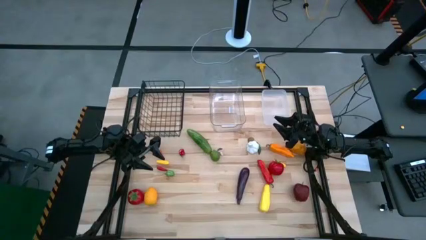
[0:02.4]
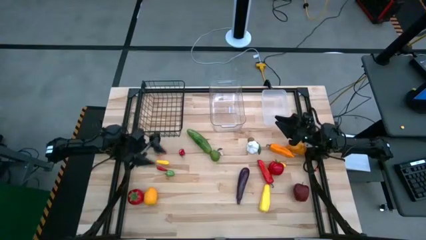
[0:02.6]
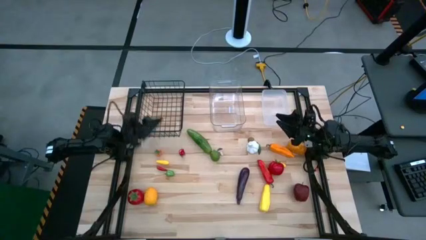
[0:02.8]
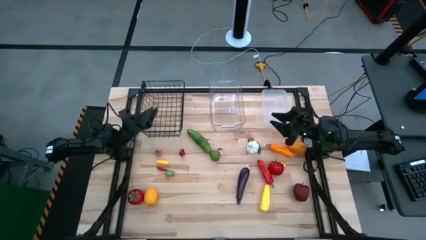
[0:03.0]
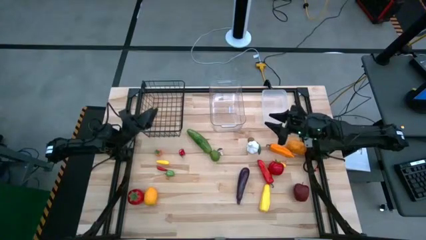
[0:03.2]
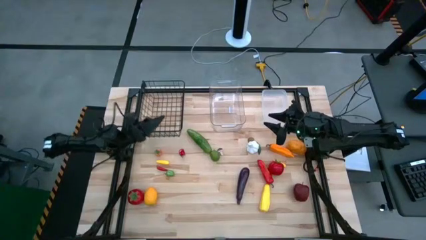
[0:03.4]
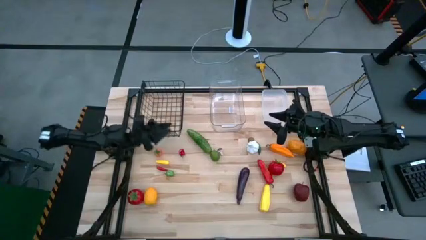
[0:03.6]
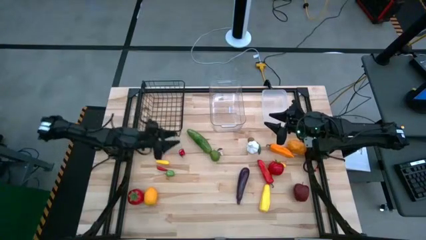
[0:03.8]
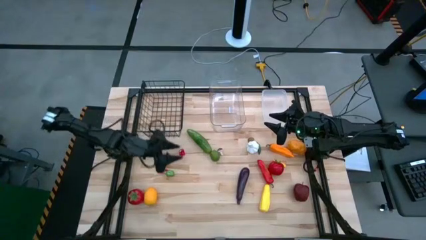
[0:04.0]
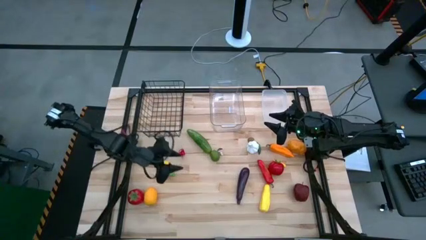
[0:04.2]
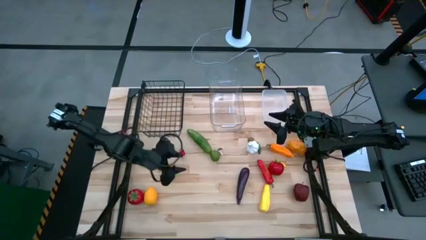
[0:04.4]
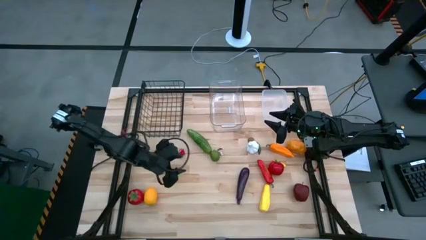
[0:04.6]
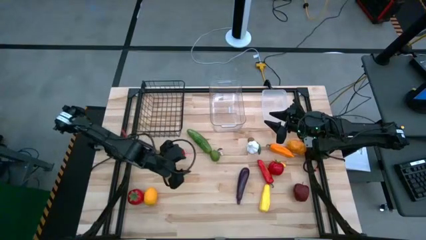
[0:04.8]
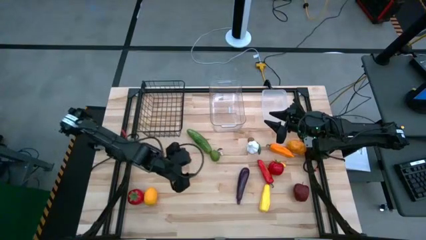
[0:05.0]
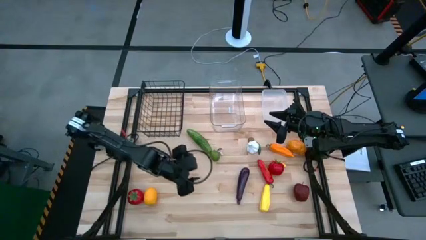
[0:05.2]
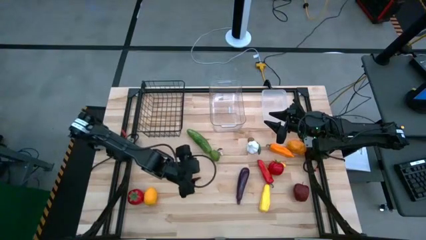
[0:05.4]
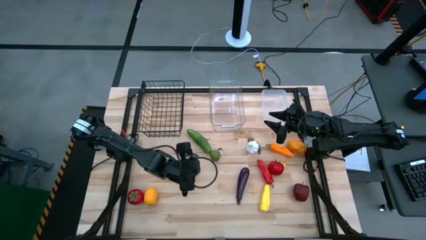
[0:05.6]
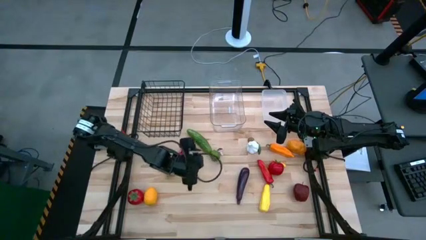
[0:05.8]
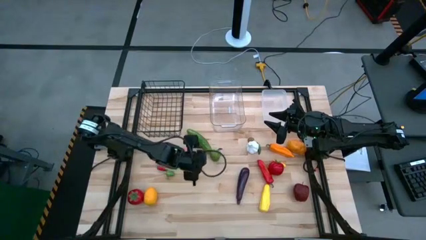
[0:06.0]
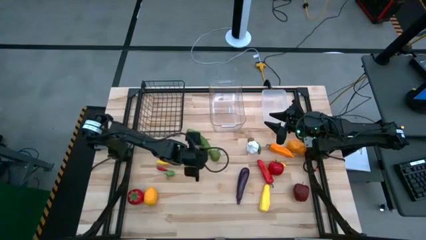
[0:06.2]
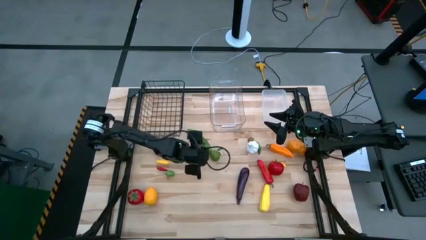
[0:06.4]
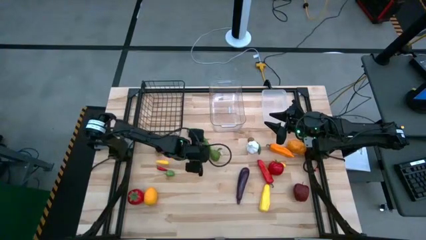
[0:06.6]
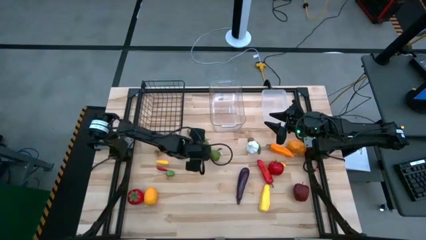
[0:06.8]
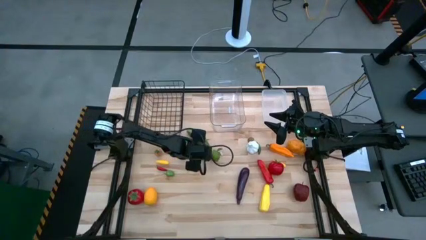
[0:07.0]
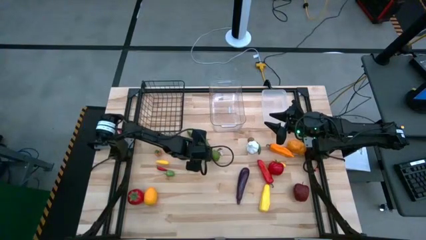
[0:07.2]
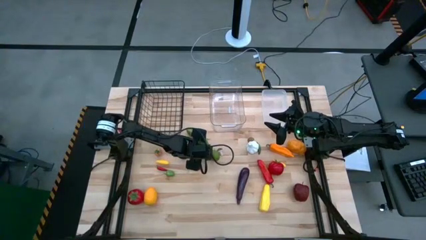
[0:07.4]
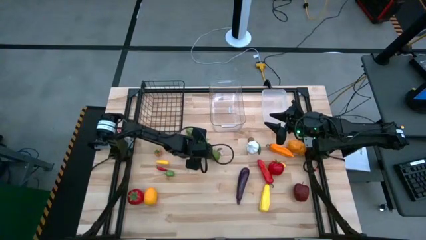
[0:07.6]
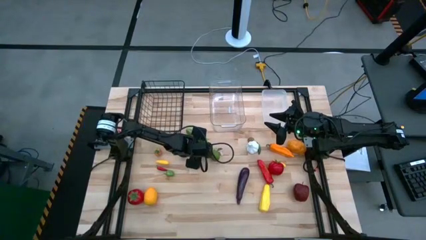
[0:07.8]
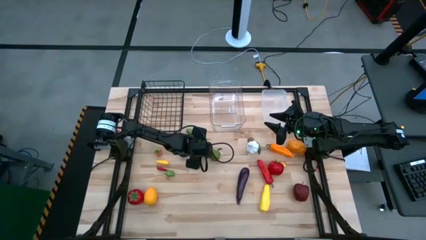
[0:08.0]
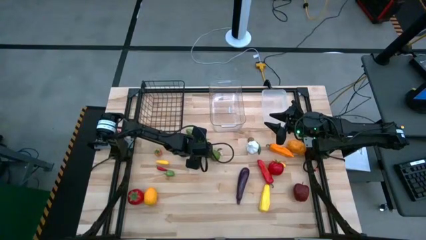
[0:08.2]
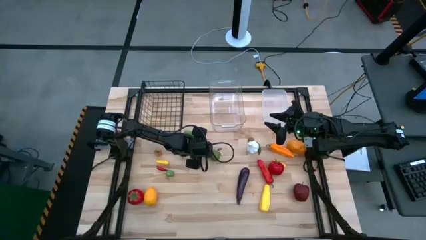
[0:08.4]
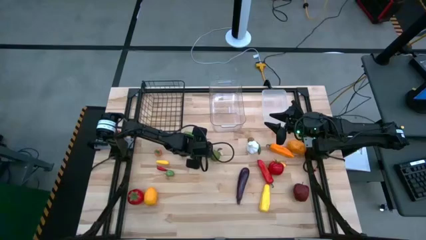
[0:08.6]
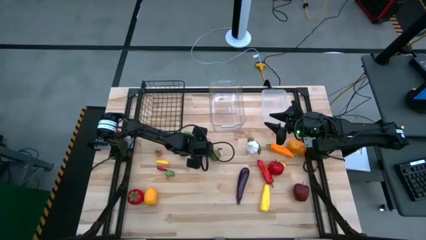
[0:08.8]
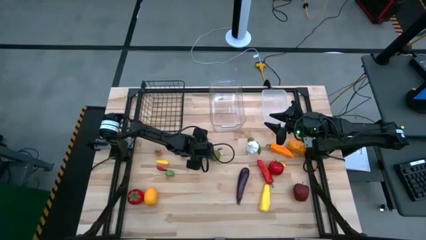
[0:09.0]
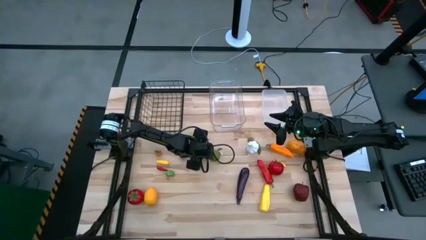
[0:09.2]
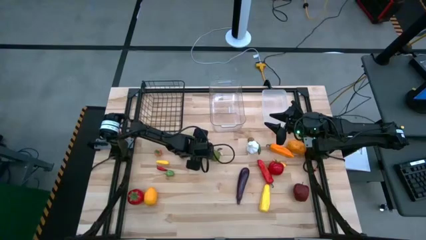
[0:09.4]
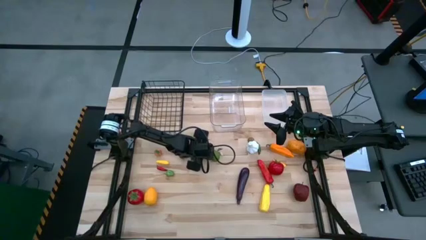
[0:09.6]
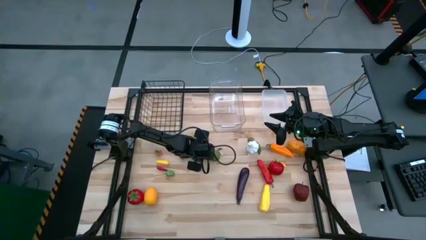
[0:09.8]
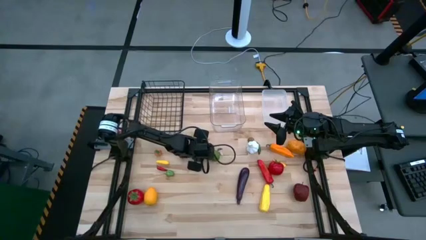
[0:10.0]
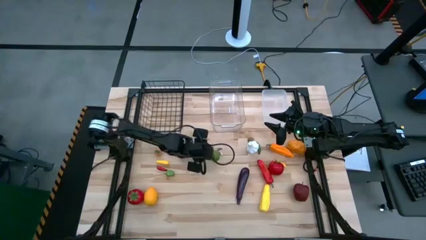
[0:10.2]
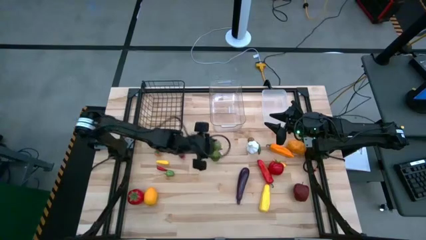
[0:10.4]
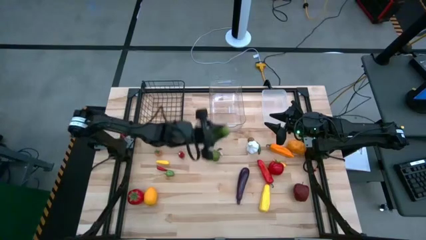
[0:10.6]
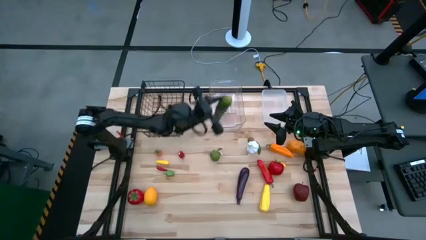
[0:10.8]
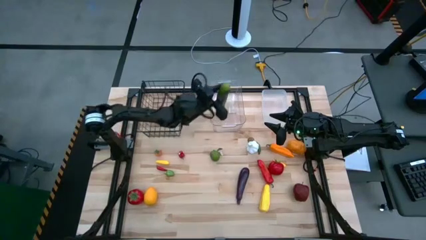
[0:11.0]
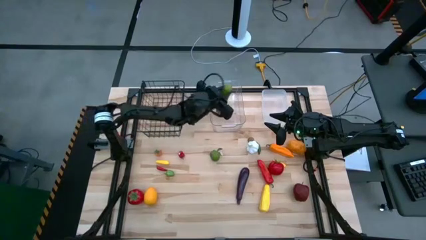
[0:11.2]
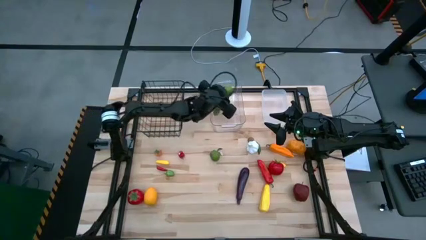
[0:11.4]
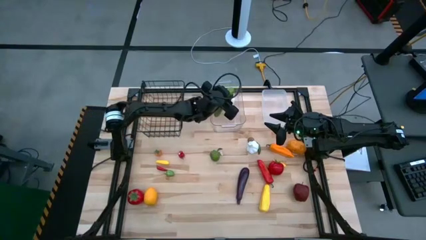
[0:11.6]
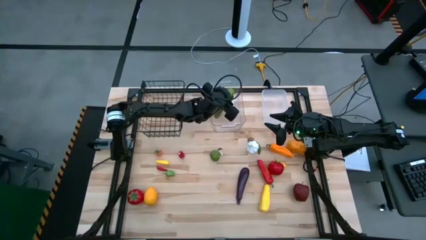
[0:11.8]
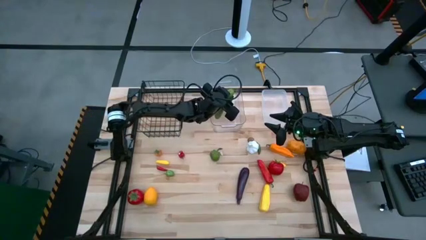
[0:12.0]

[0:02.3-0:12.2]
Task: Sort produce into baskets
Put the green cucumber into the left transparent bin

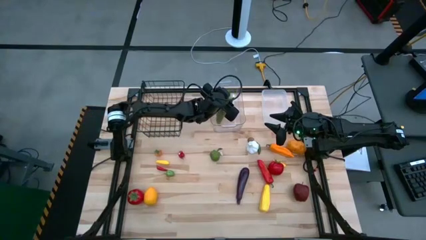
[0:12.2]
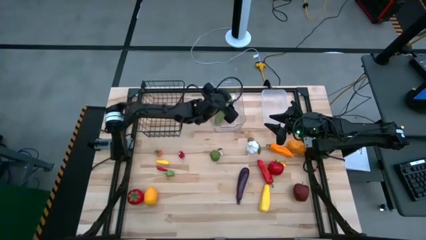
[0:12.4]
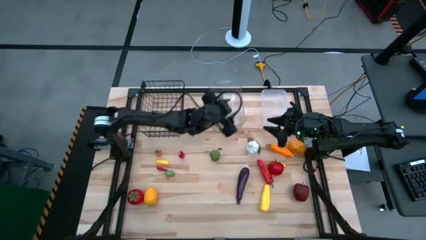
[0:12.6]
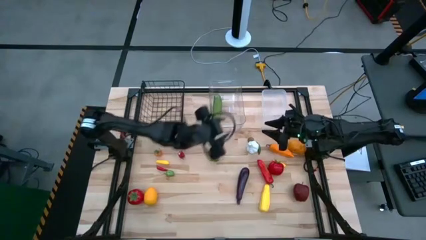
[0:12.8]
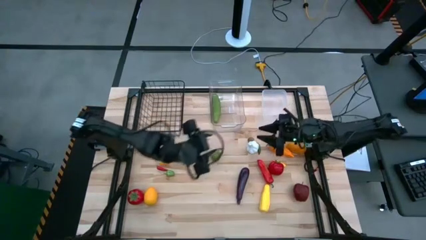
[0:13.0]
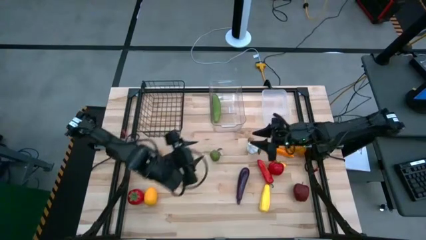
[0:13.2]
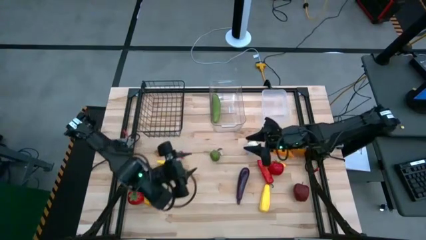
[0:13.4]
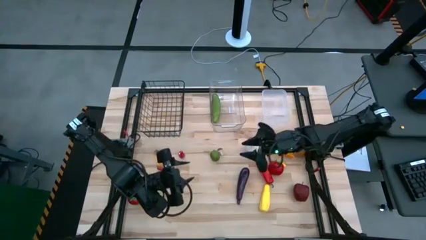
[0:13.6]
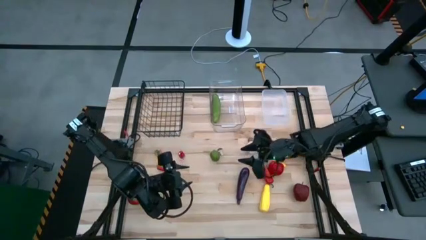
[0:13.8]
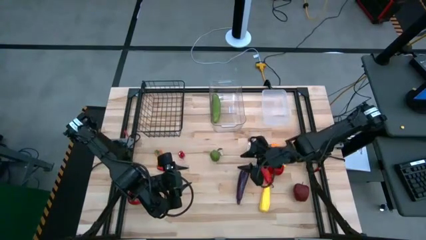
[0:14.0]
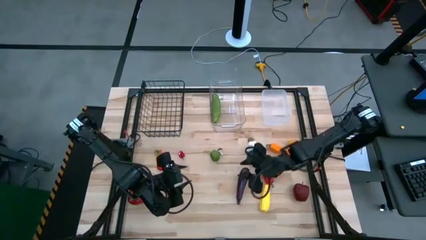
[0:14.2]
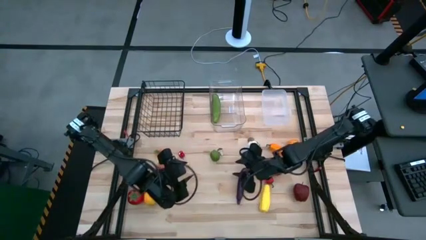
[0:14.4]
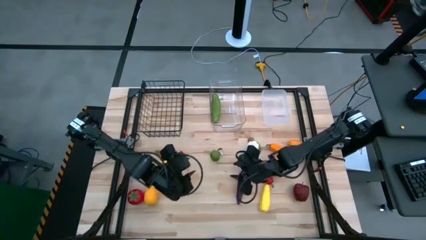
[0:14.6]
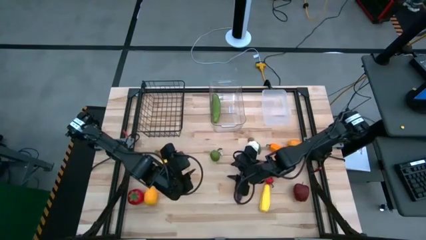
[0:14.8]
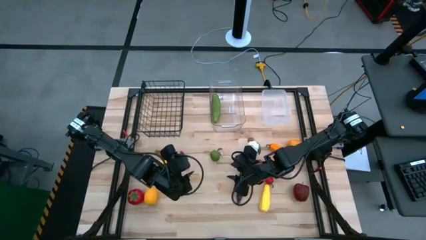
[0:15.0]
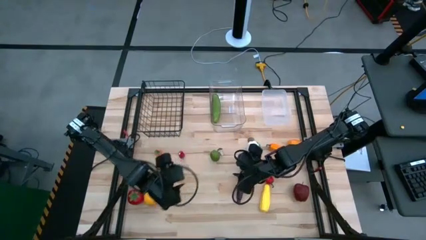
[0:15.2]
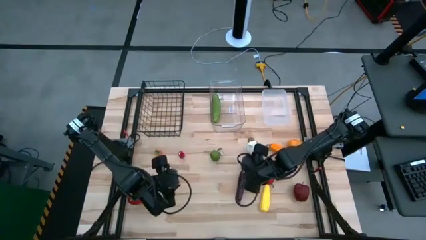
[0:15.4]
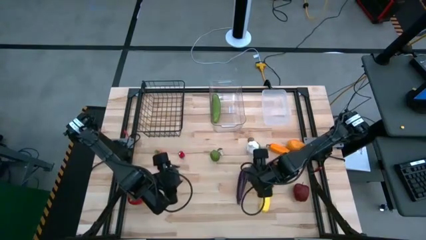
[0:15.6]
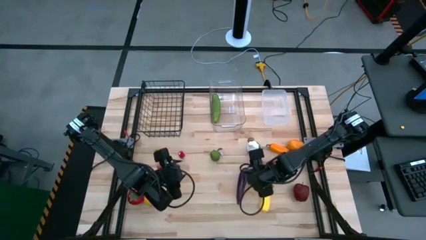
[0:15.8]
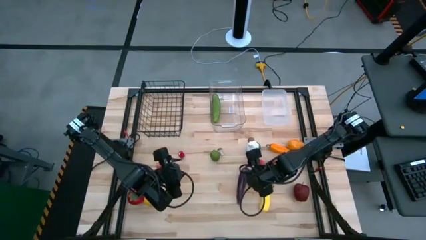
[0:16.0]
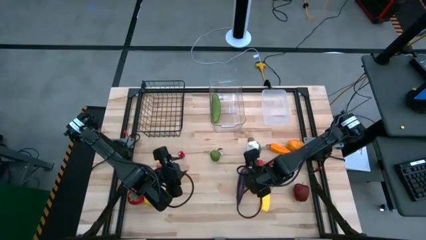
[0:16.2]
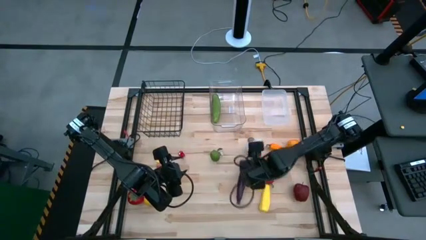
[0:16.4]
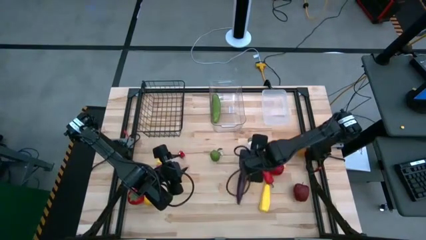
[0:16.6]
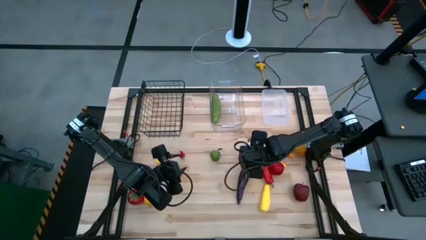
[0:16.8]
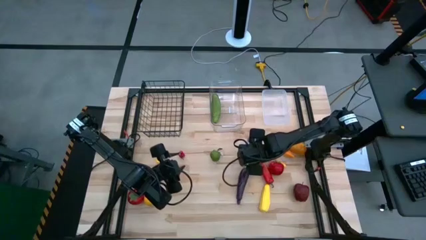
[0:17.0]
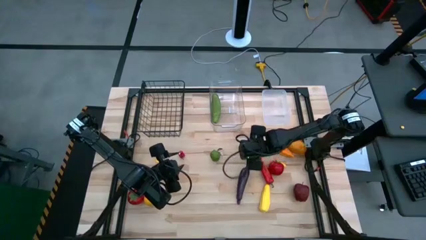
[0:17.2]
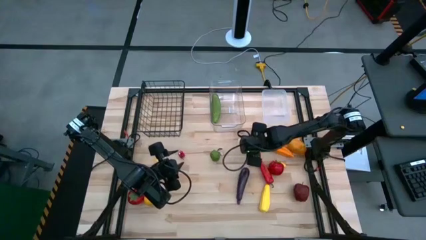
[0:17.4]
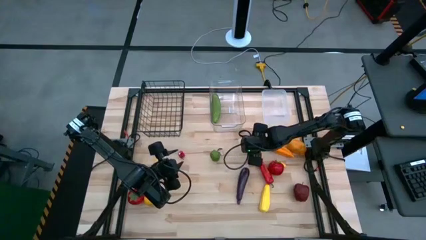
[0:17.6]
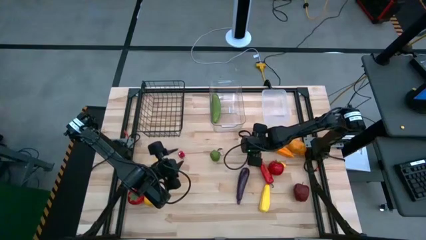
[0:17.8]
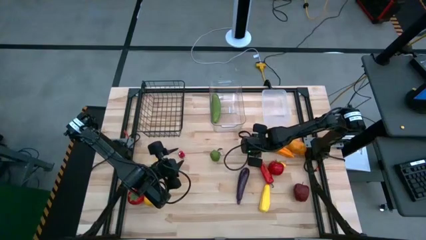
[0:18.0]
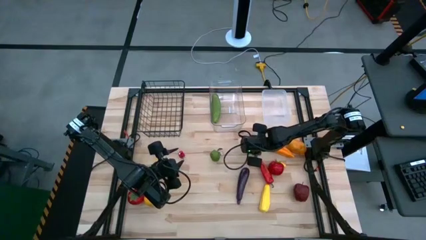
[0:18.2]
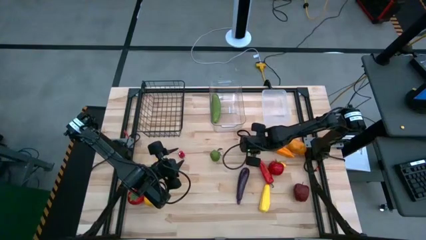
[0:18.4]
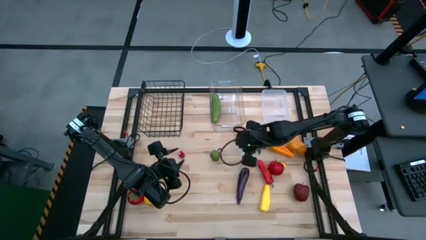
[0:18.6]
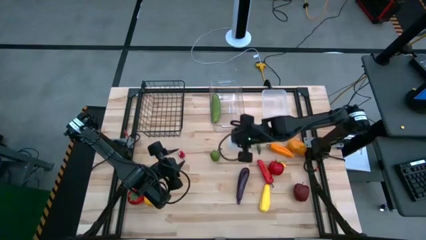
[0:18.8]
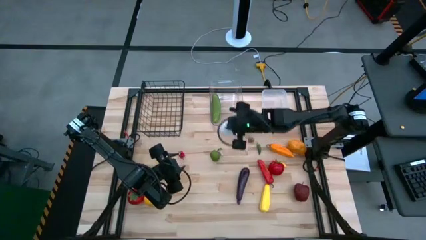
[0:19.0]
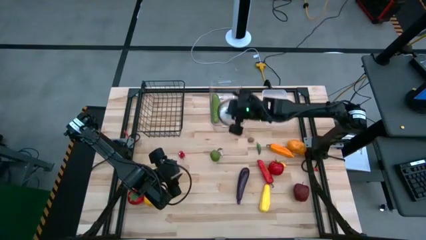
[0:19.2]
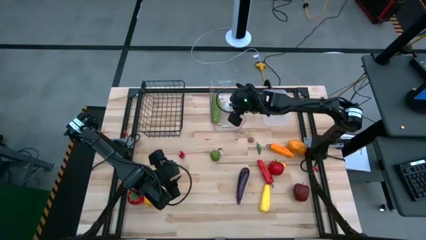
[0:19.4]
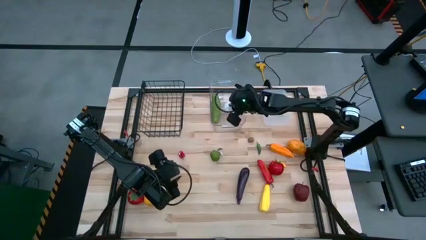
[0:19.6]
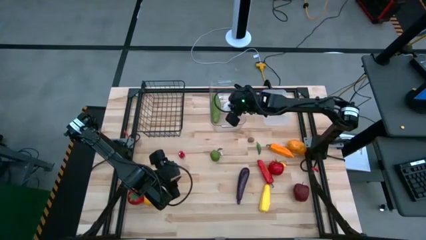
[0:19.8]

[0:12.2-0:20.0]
Put the right transparent garlic into the left transparent bin
